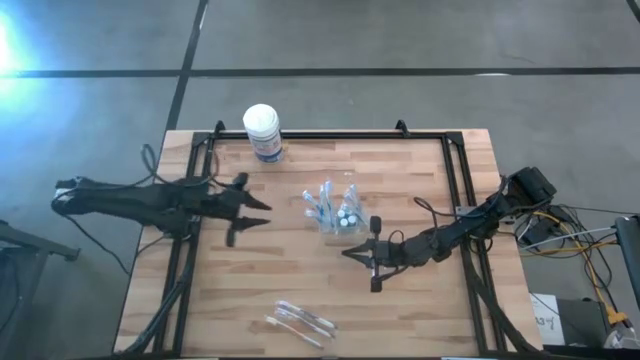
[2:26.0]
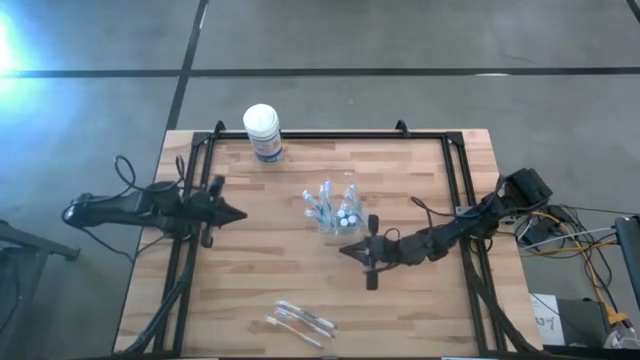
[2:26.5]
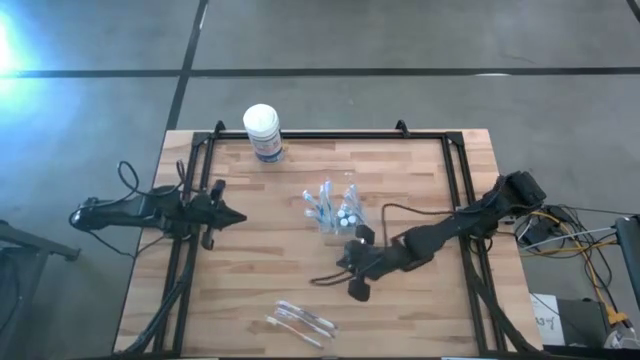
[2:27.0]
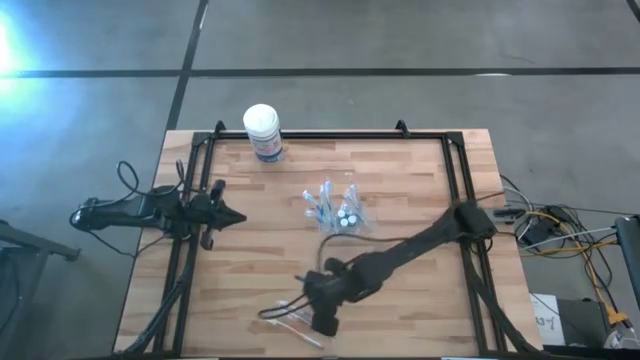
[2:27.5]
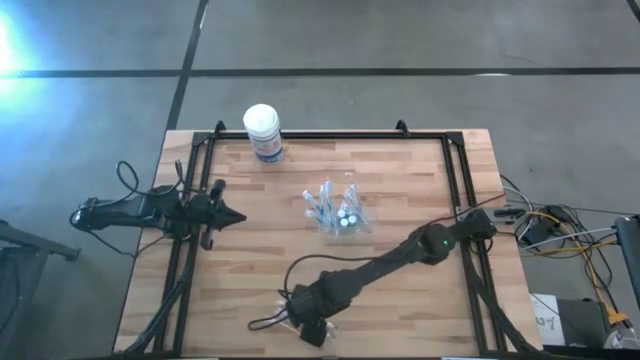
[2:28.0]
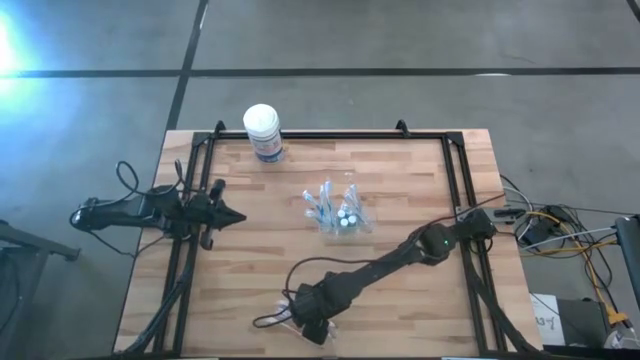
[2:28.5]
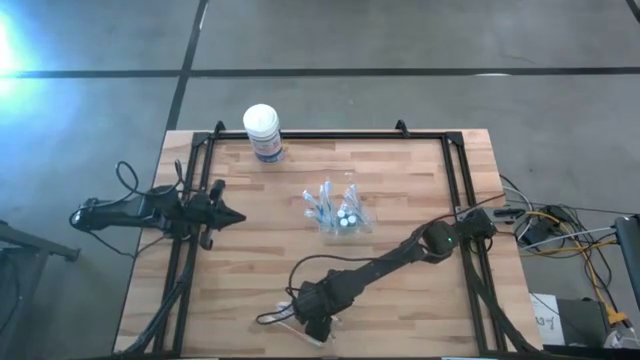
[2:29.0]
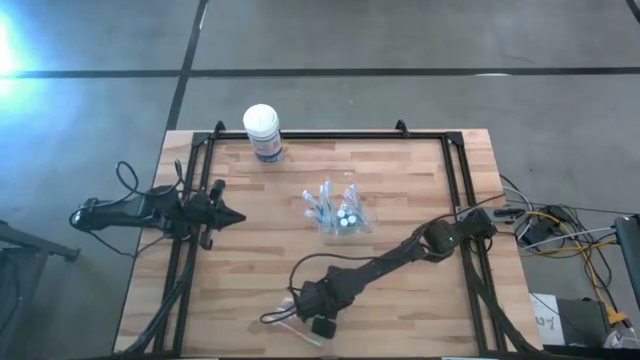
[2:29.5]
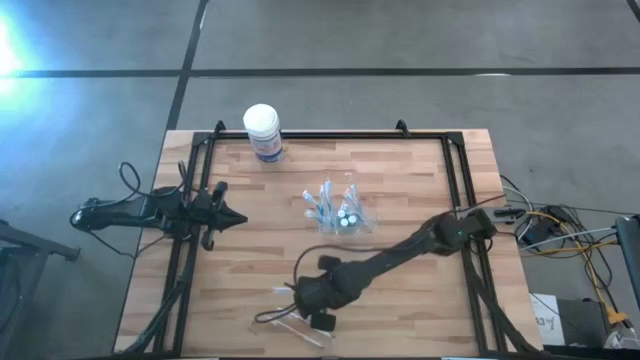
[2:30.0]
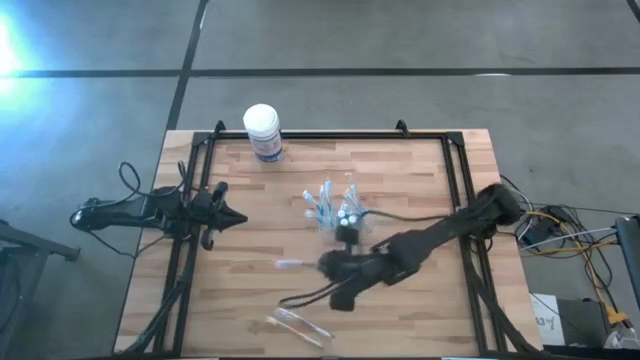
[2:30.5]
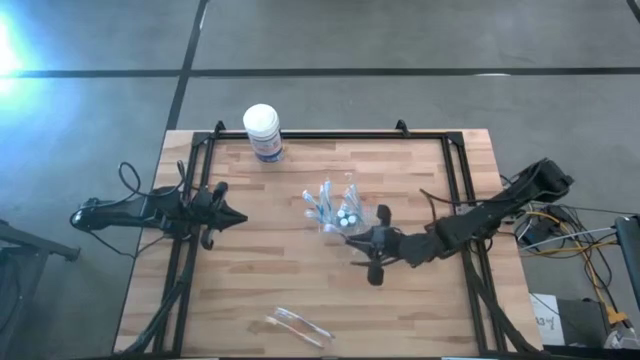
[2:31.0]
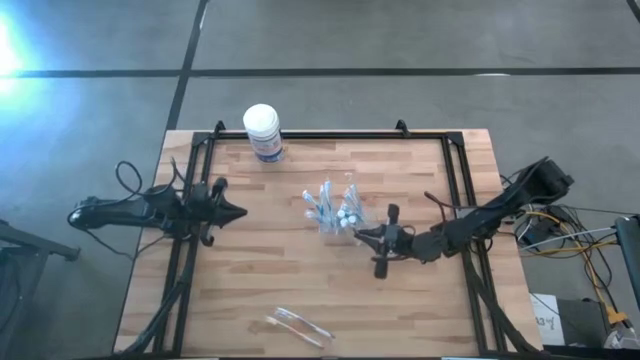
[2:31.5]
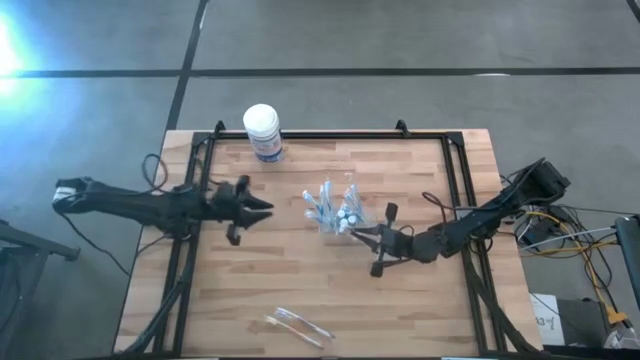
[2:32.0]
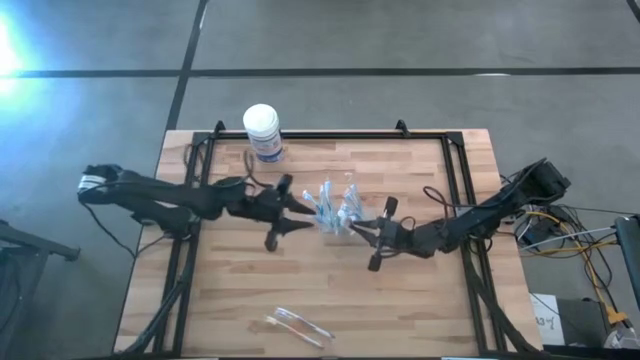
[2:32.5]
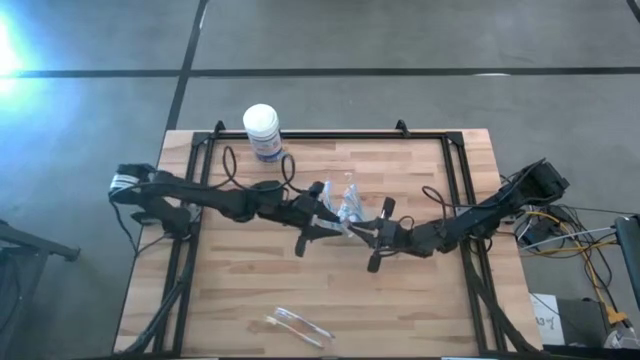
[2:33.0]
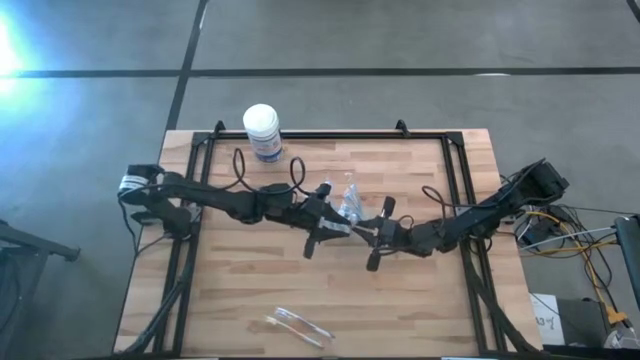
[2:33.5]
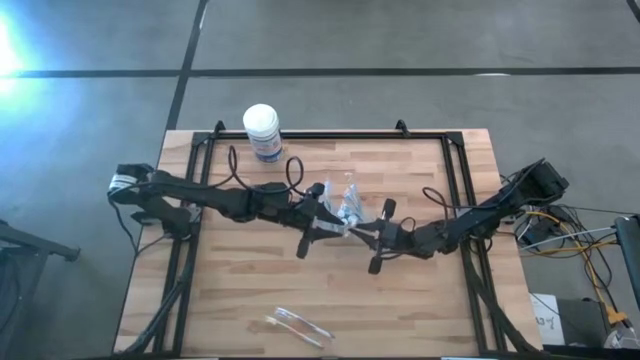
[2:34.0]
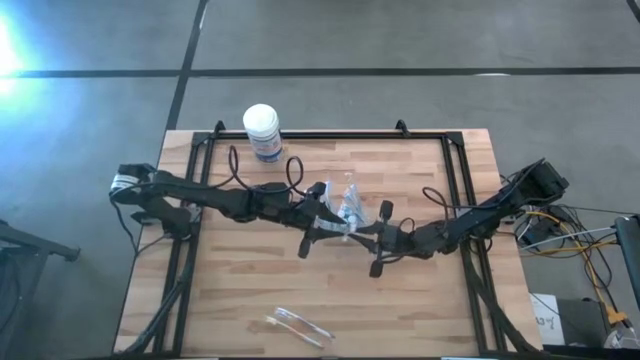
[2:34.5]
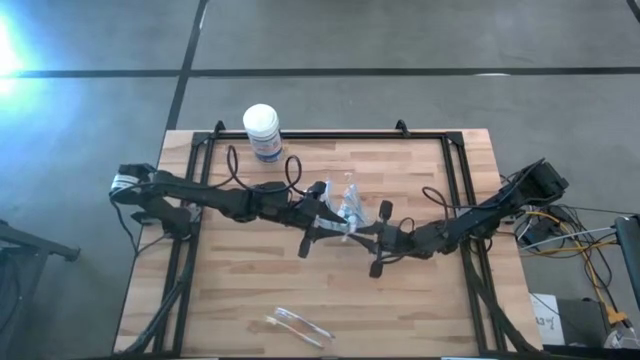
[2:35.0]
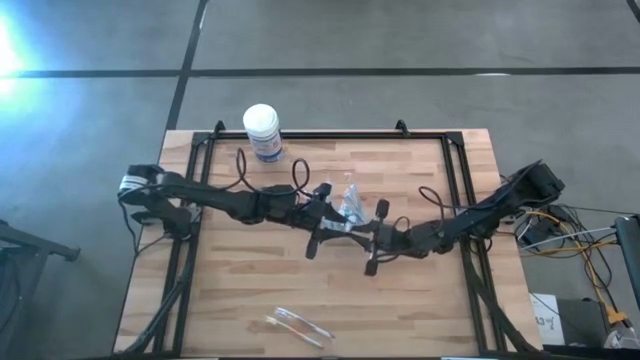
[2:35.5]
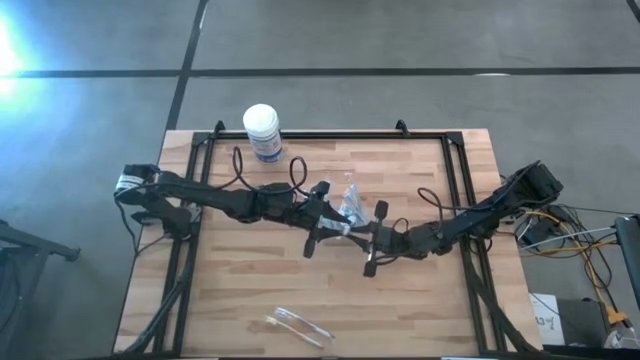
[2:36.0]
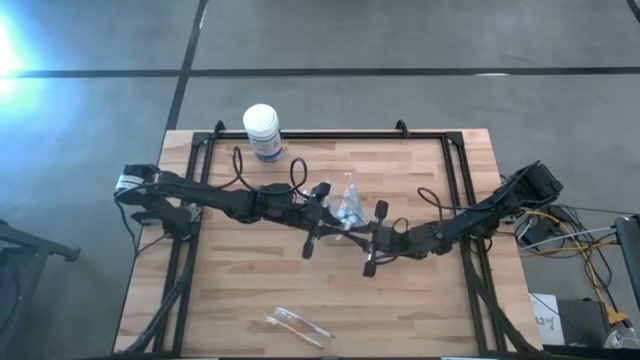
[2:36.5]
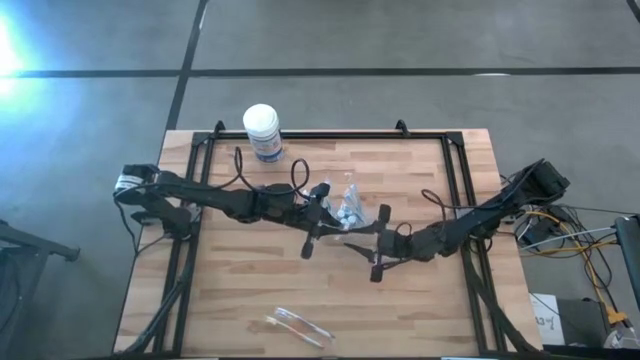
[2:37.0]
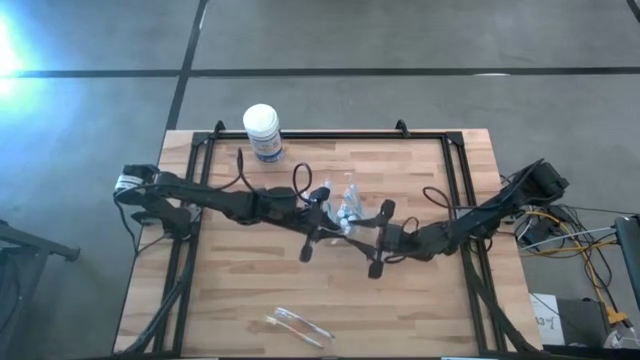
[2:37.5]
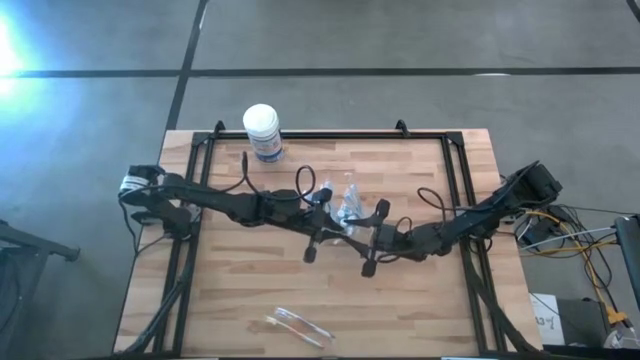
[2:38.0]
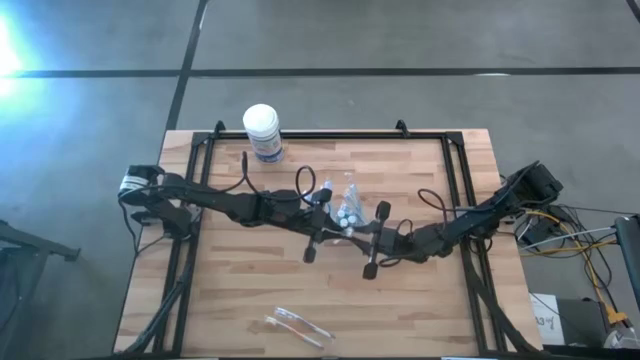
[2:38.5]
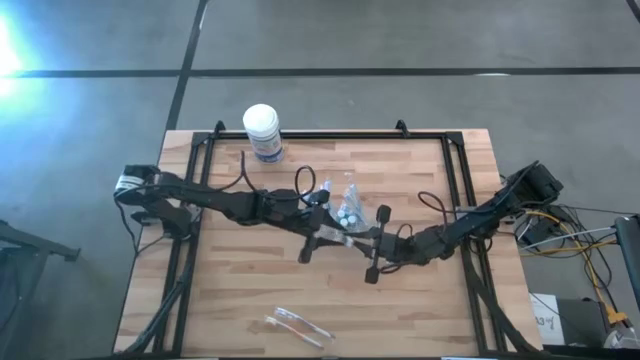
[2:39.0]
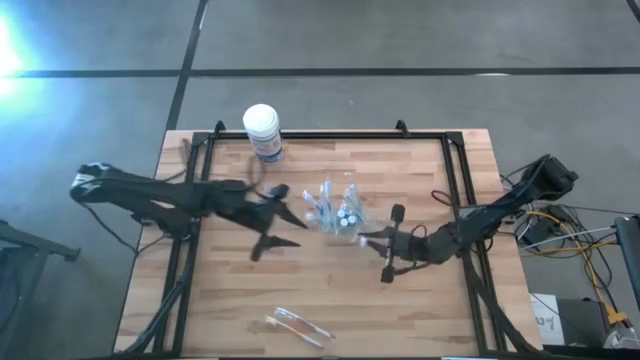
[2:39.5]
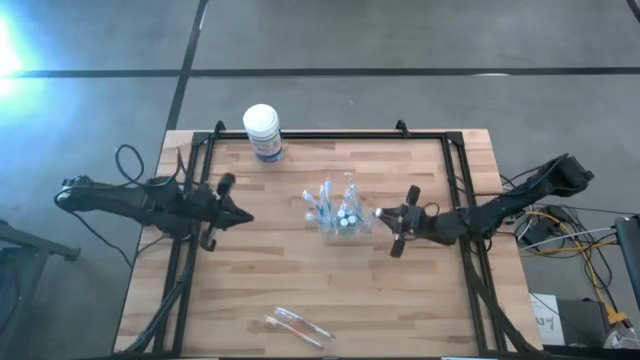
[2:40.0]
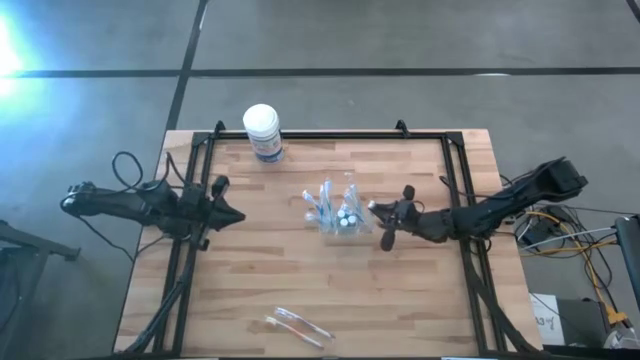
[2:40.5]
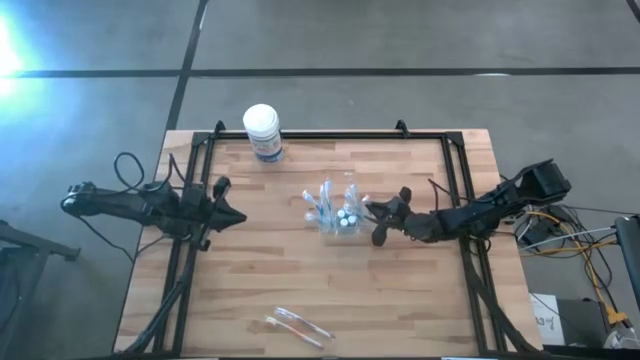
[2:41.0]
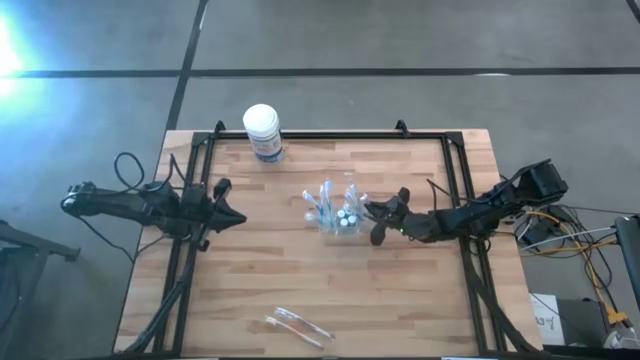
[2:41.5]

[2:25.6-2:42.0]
Task: Pick & Place toothbrushing station
Put the purple toothbrush into the transparent organizer

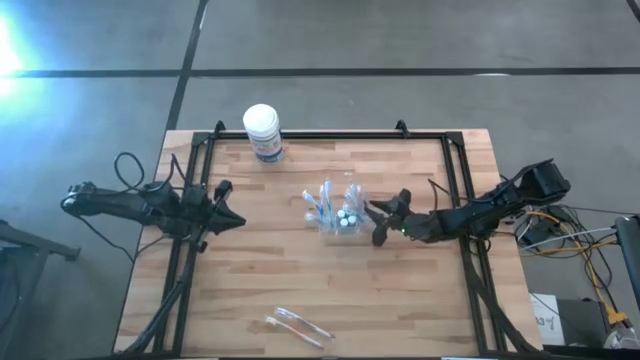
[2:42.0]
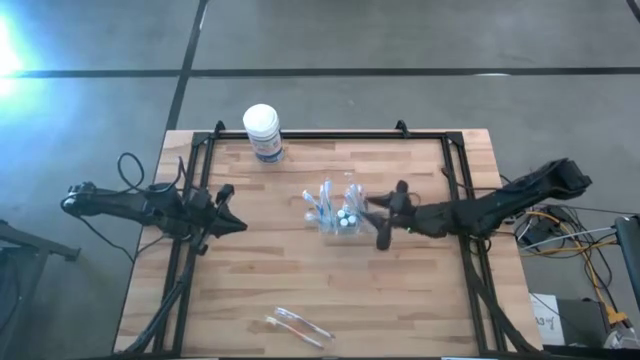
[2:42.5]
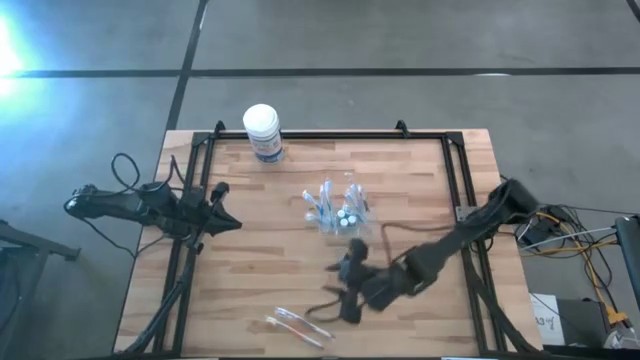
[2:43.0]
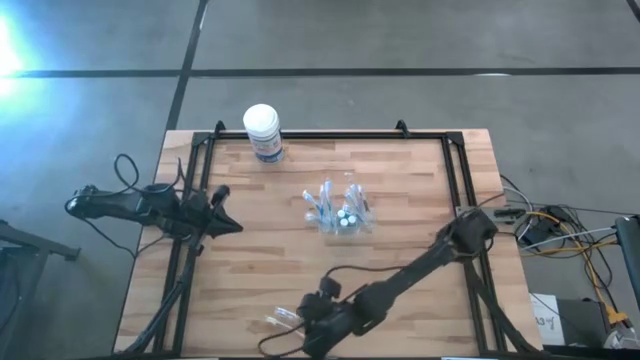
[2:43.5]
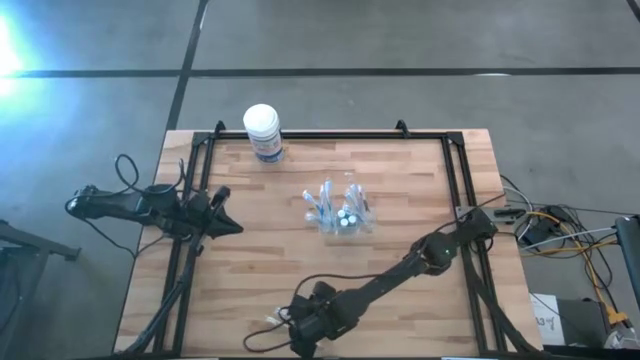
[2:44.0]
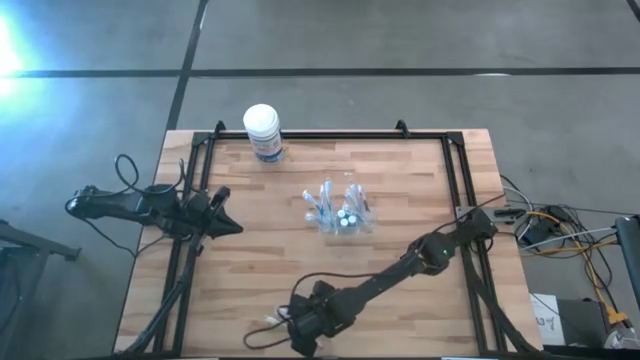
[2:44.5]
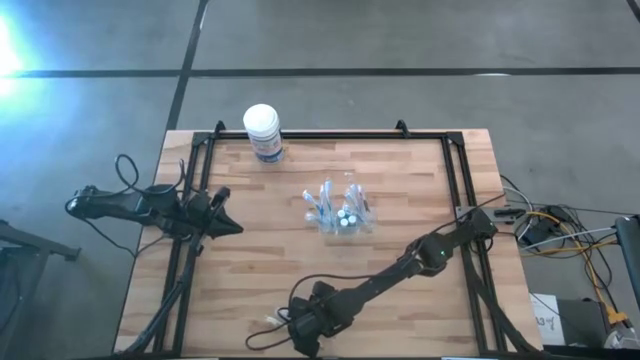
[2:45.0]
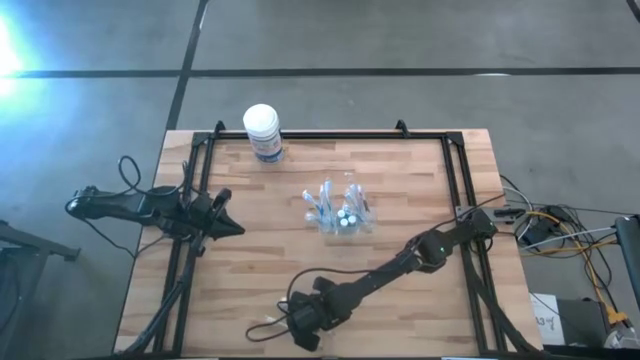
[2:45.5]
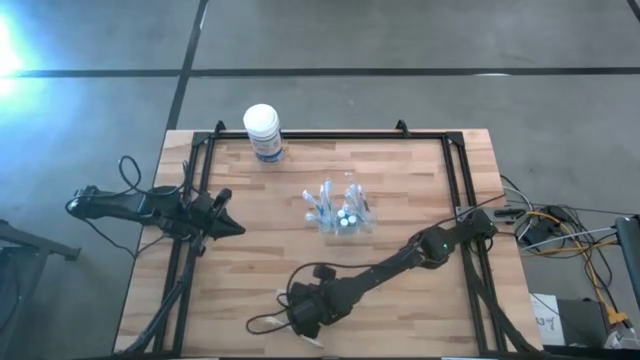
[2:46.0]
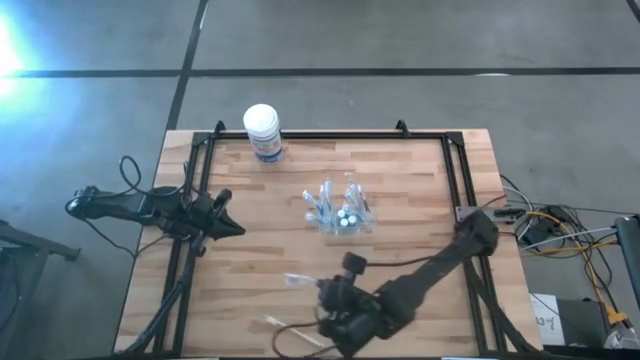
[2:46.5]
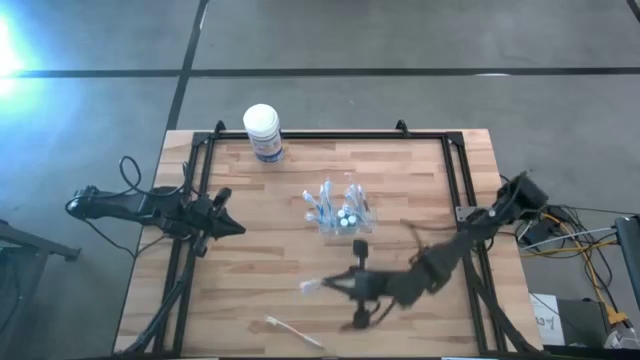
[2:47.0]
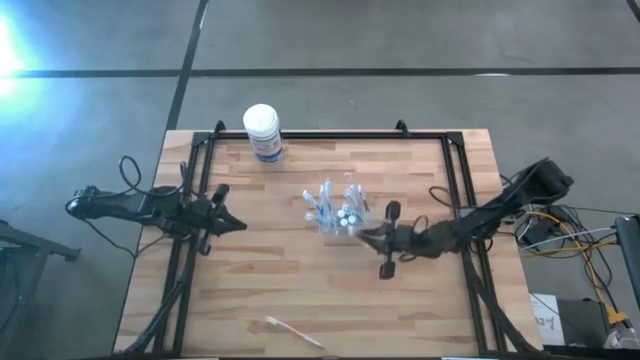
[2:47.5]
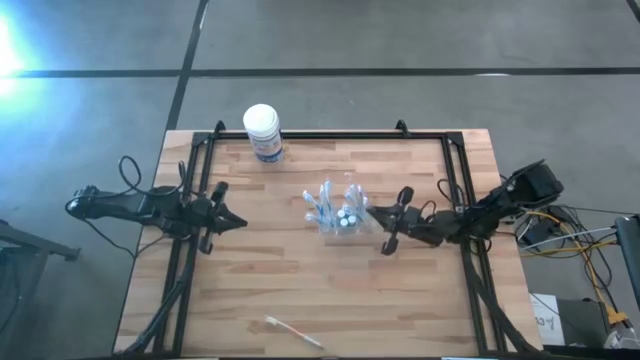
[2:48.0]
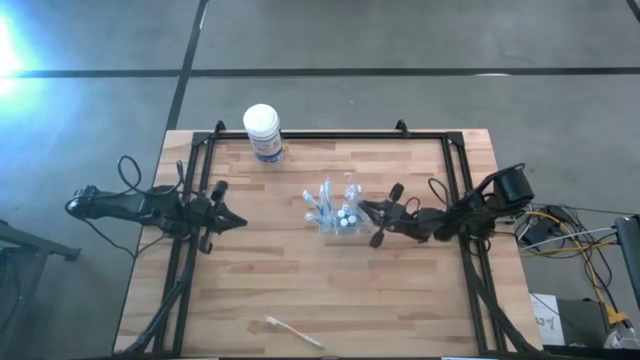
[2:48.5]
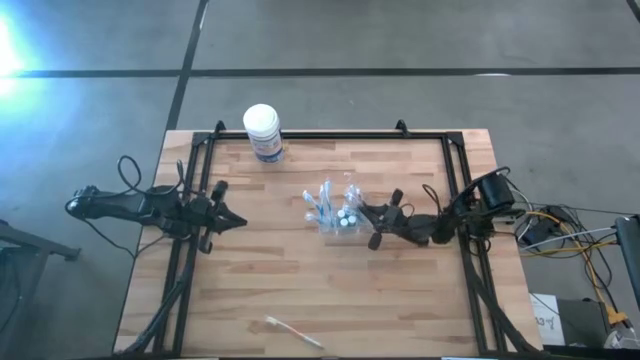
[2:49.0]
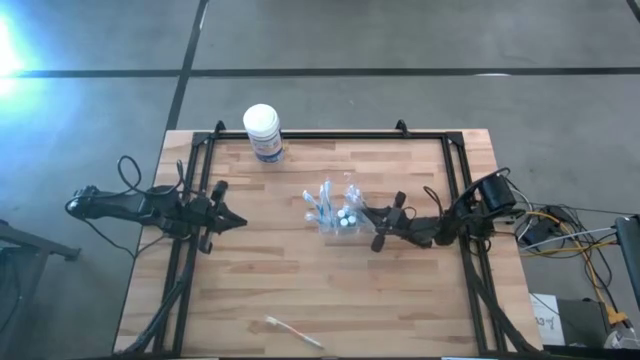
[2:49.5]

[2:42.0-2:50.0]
Put the purple toothbrush into the transparent organizer
